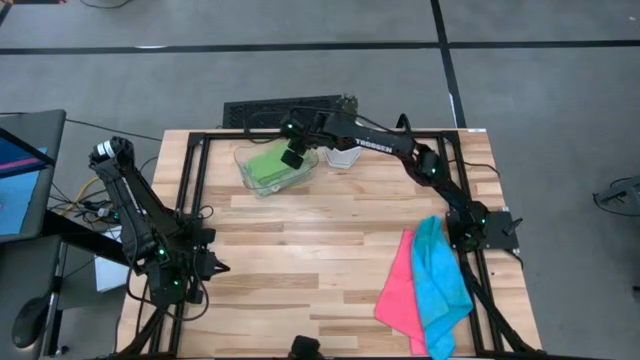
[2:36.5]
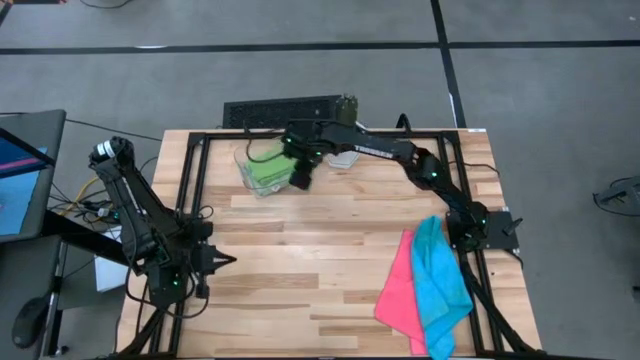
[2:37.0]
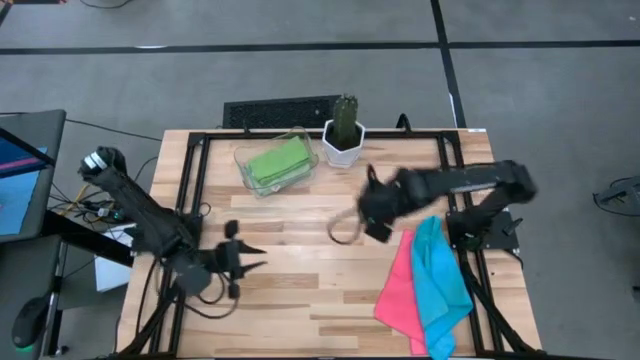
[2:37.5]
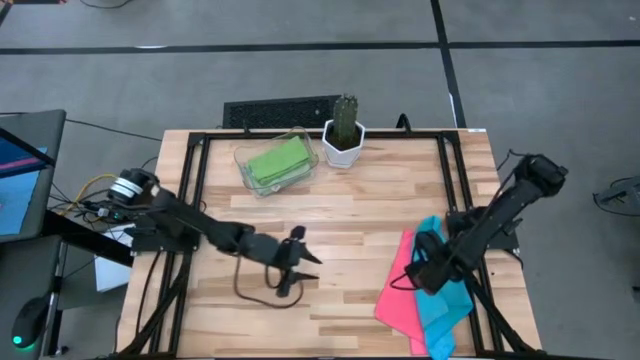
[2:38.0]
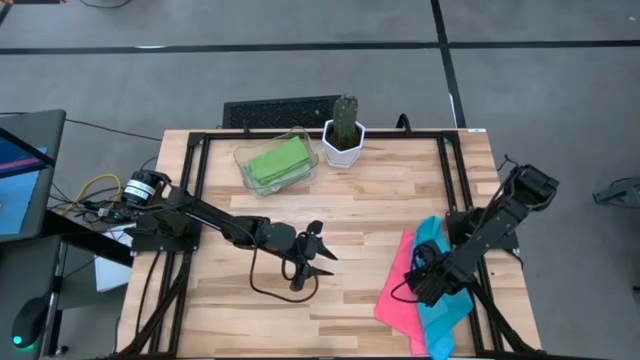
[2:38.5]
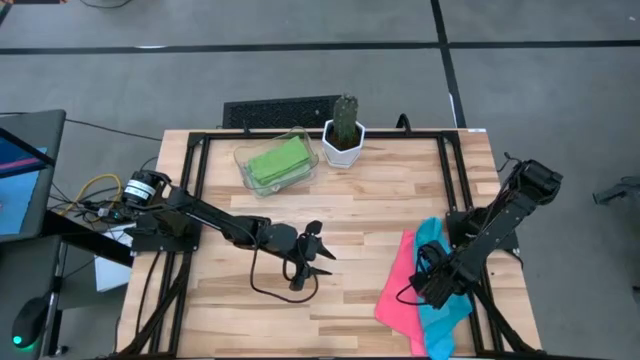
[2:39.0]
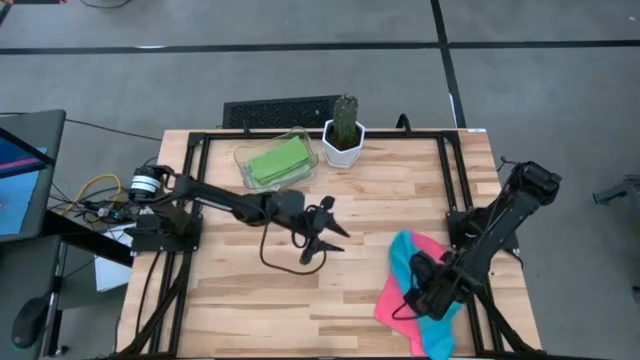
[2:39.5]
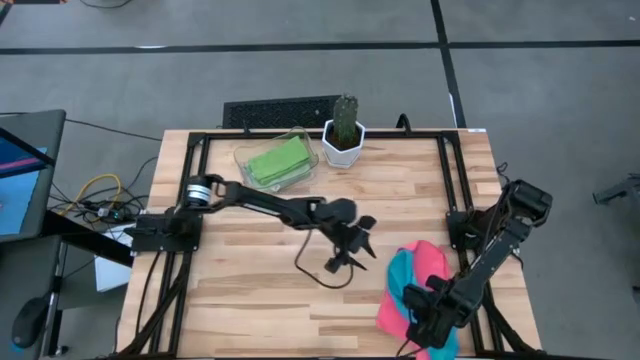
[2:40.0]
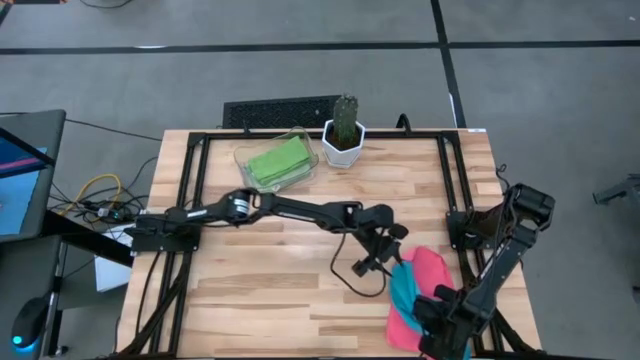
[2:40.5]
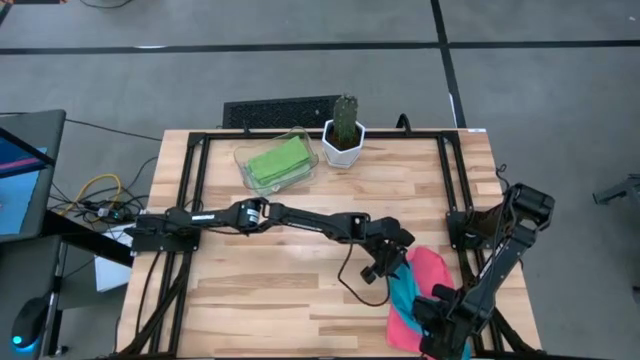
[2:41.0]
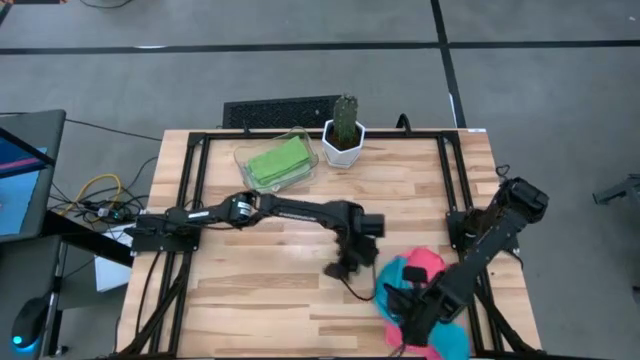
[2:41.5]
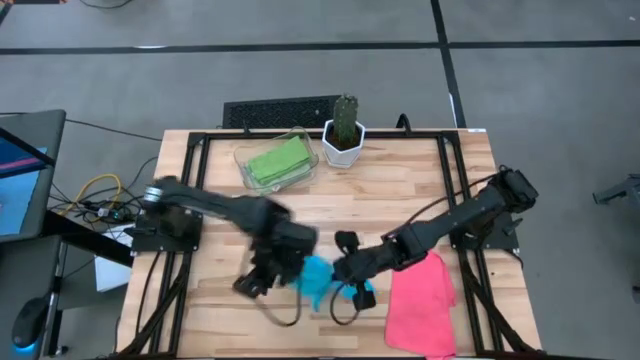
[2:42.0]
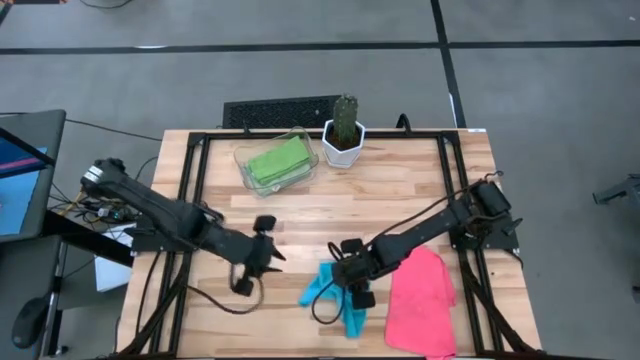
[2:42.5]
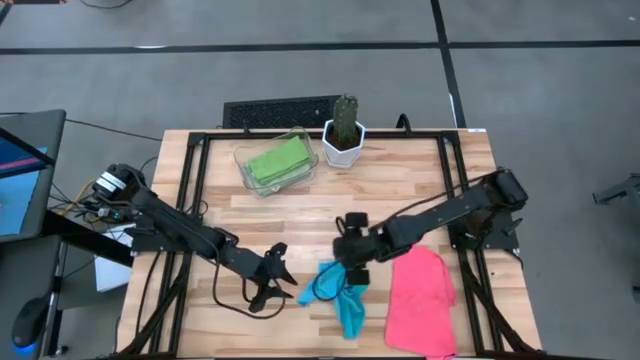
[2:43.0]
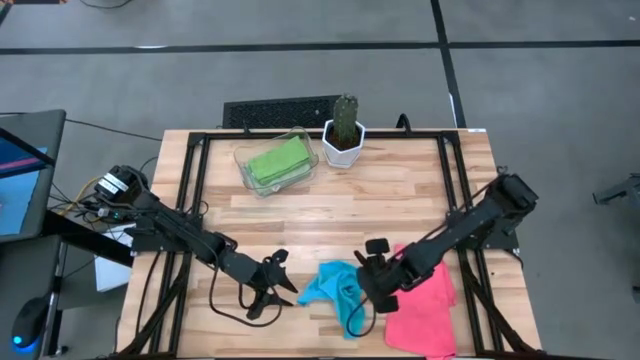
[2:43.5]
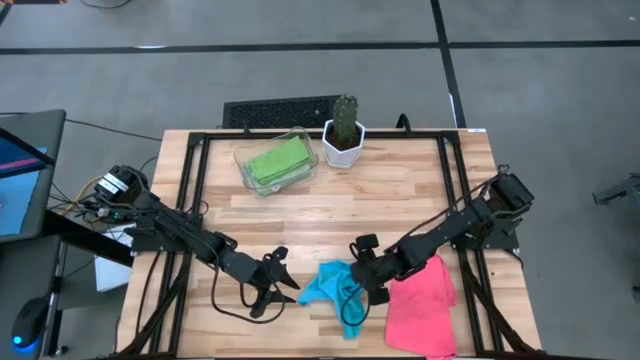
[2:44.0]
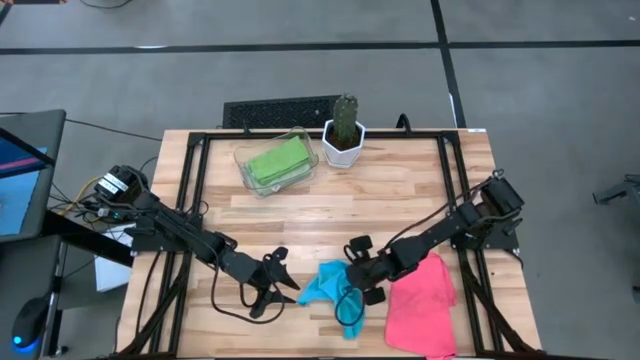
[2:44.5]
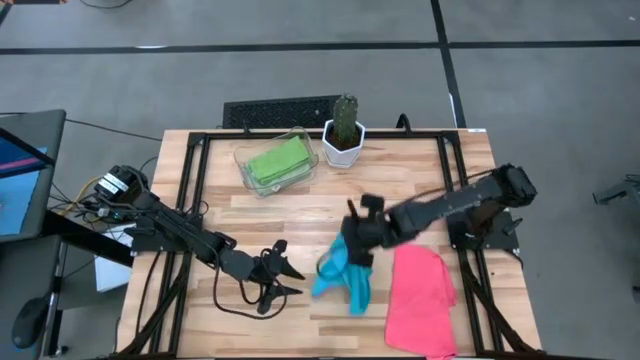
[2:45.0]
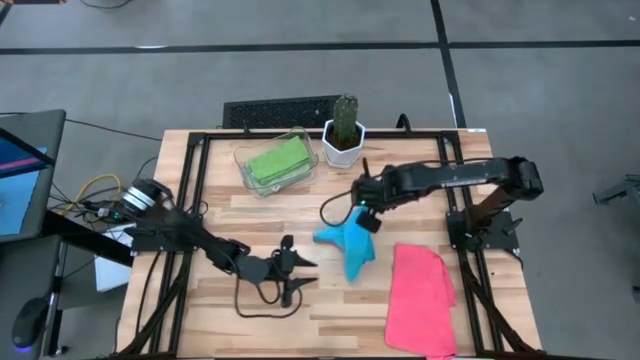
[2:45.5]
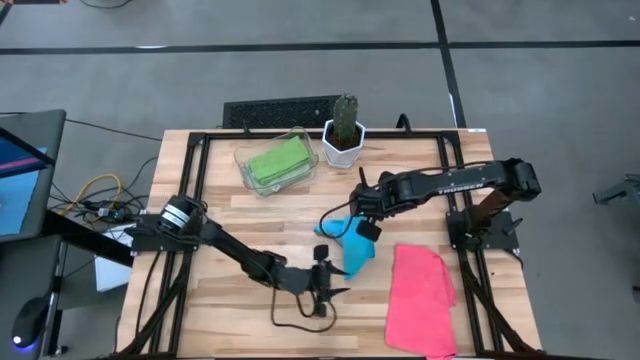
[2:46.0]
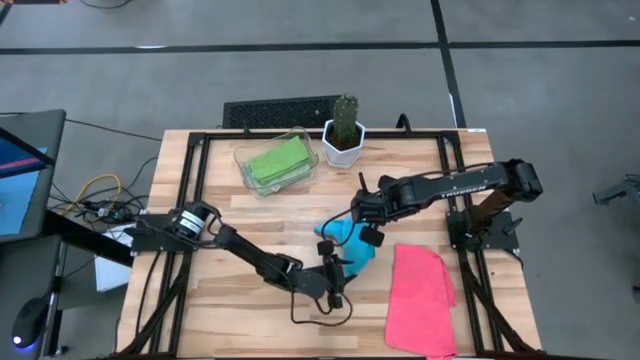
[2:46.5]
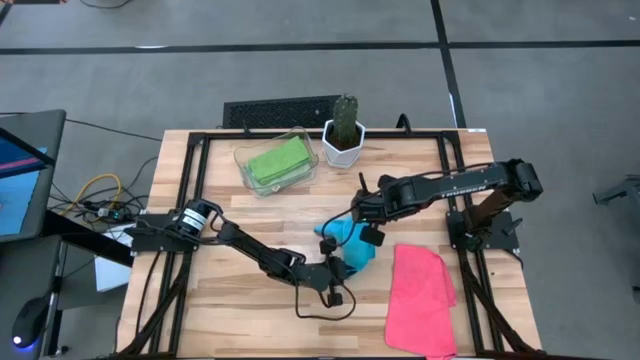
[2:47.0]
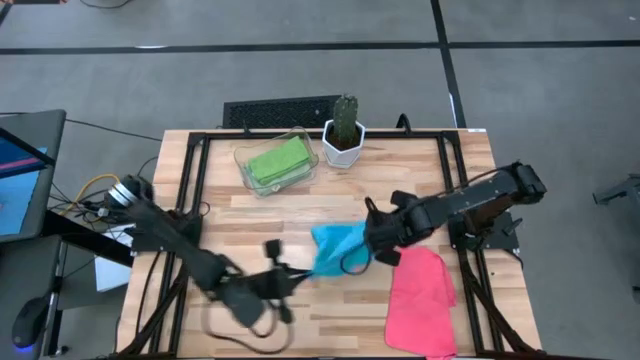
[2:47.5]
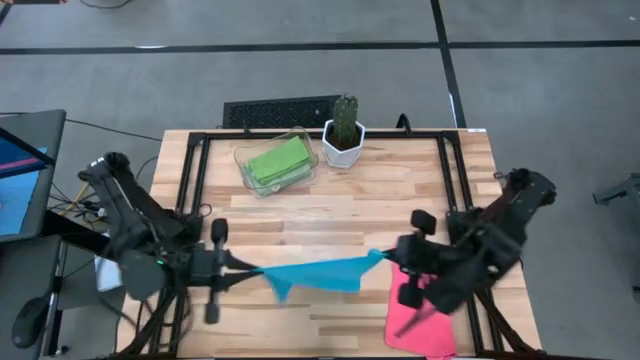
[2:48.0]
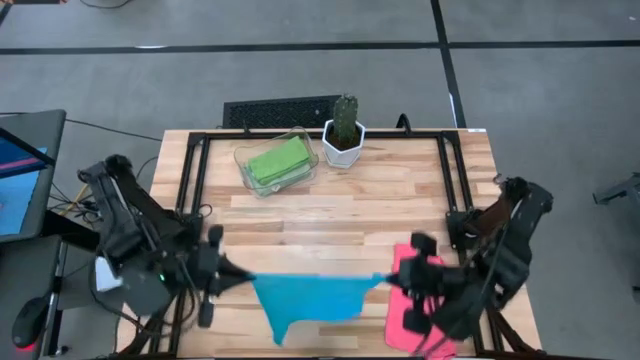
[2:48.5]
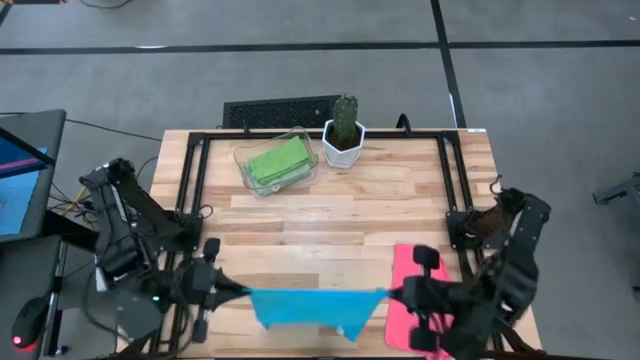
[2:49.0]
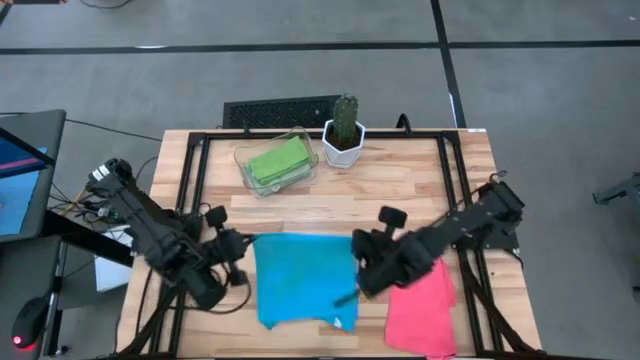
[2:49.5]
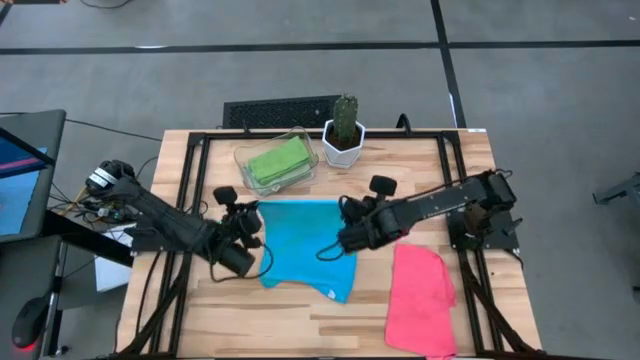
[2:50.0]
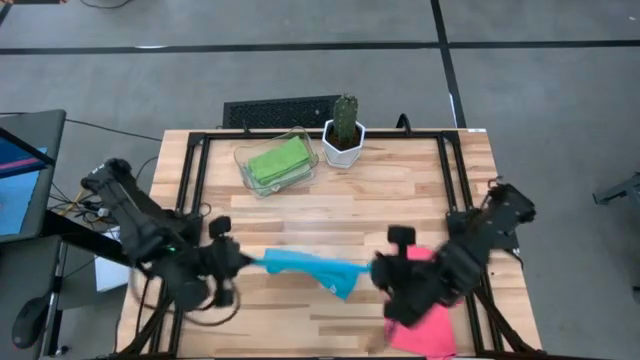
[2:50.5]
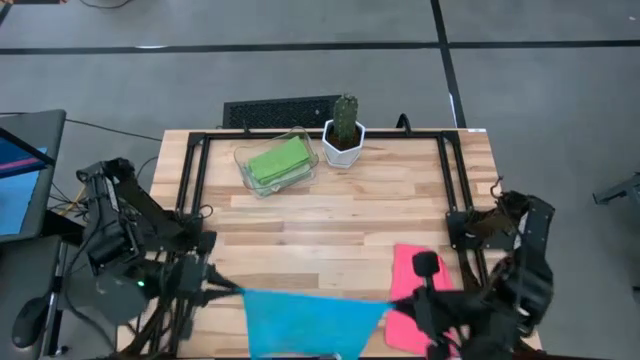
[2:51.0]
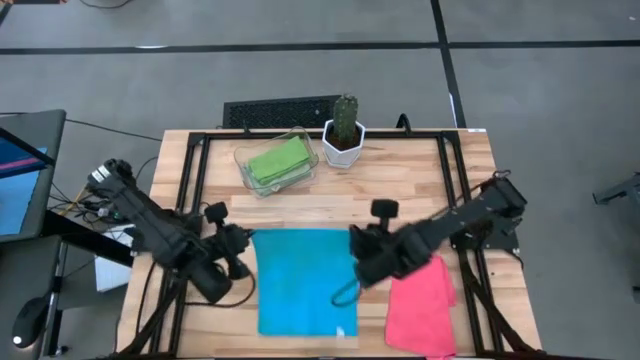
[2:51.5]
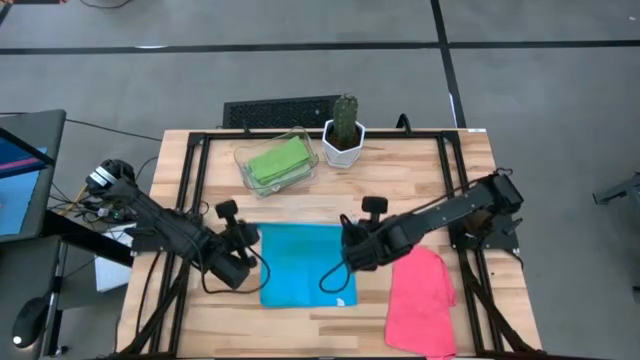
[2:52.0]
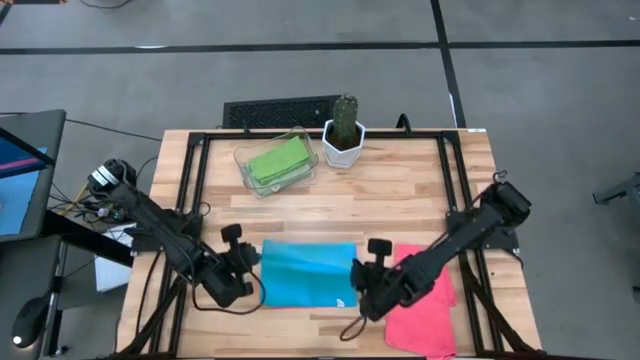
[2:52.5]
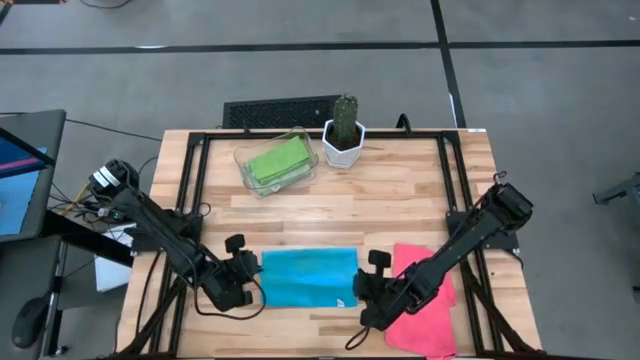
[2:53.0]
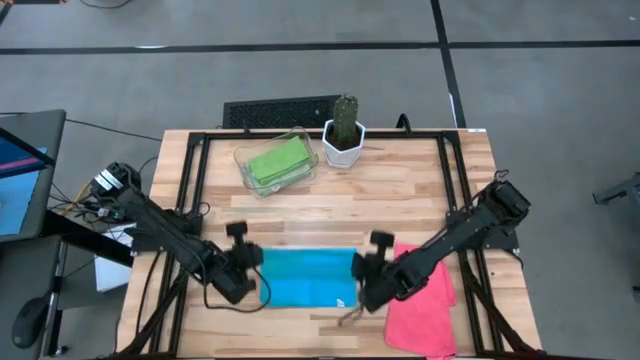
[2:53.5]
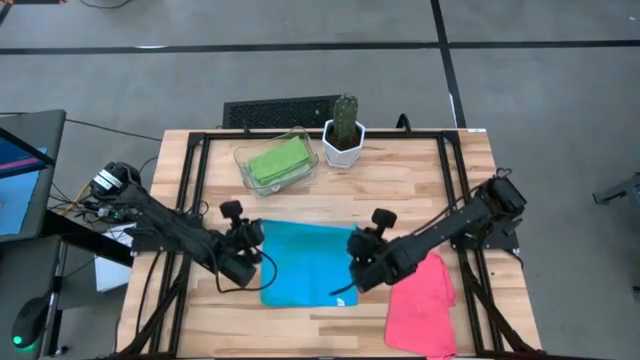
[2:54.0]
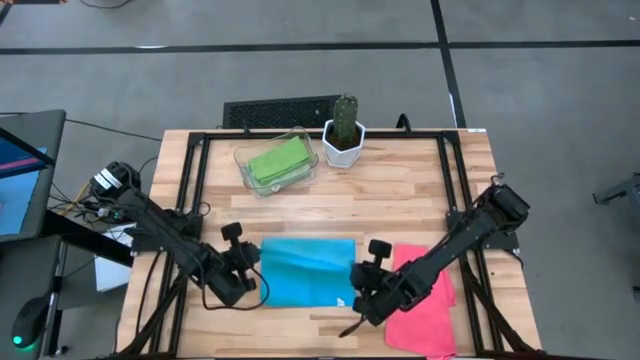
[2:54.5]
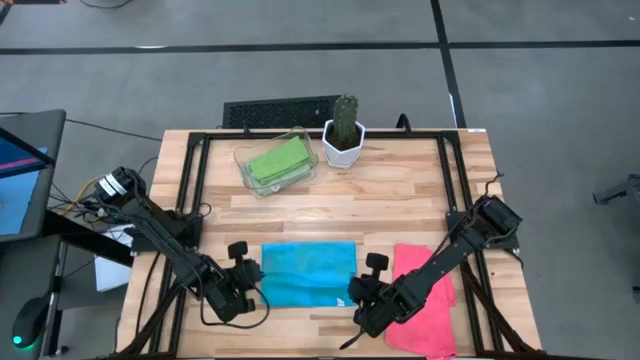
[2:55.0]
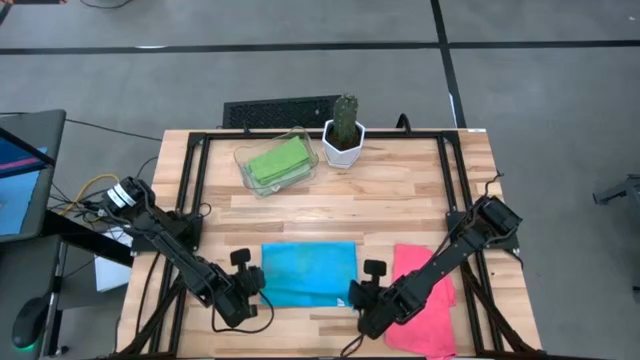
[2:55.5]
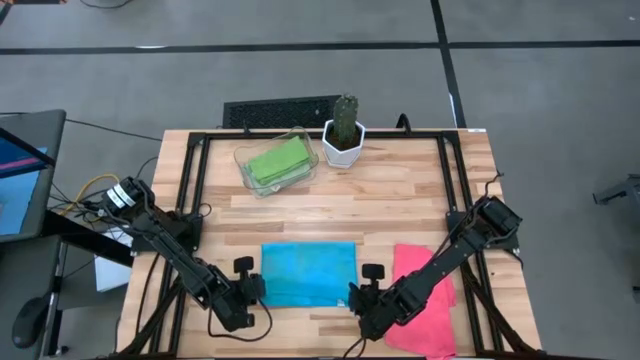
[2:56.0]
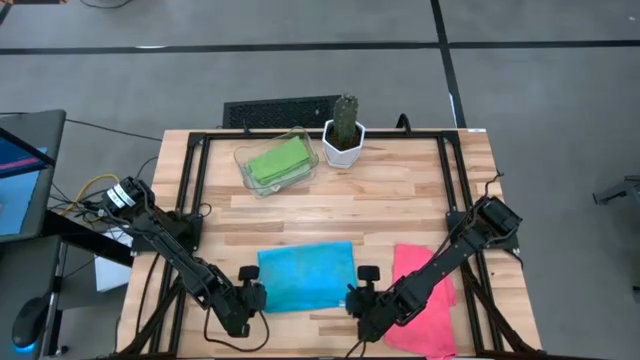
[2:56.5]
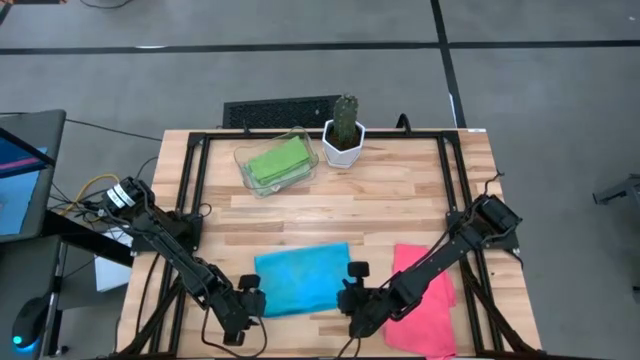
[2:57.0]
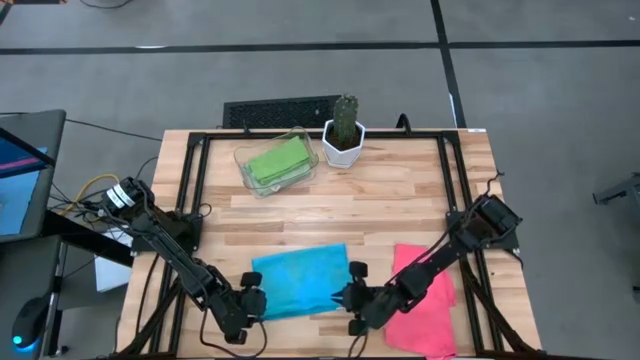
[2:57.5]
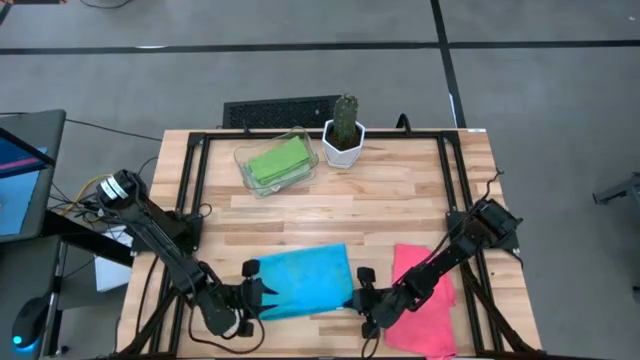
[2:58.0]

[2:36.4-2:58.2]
Task: Fold microfiber towels
Fold the blue microfiber towel
